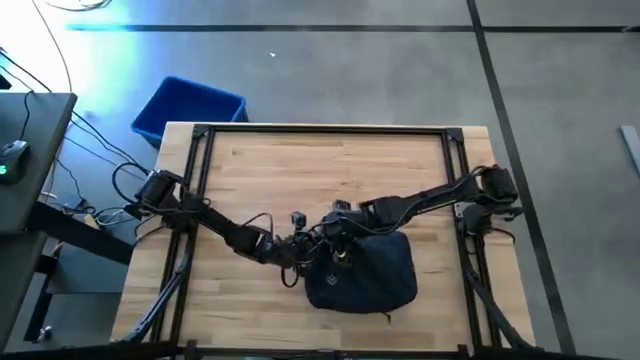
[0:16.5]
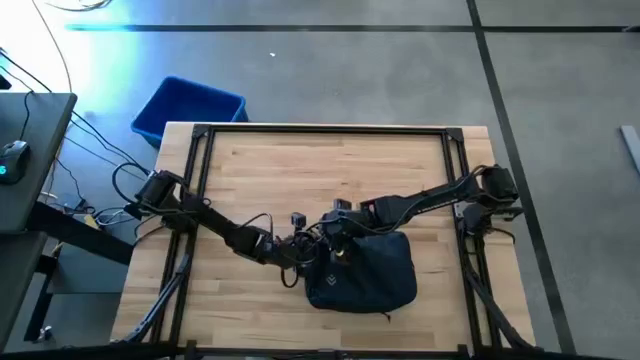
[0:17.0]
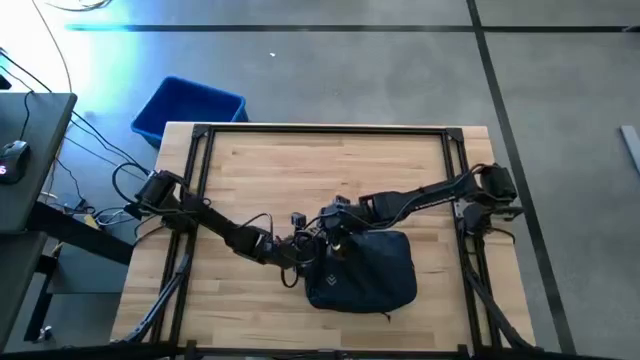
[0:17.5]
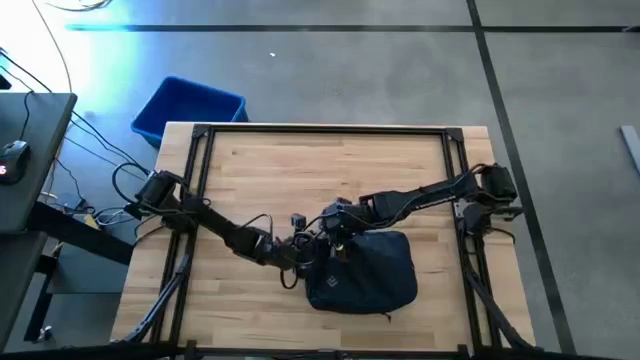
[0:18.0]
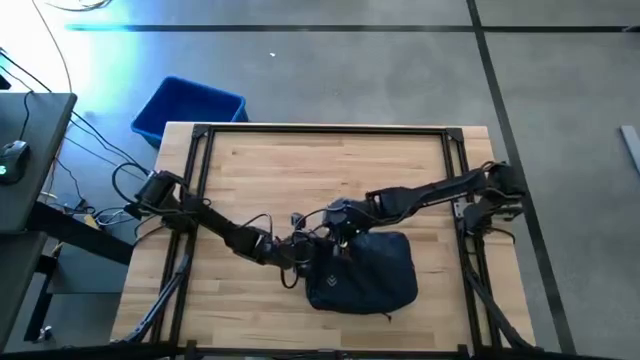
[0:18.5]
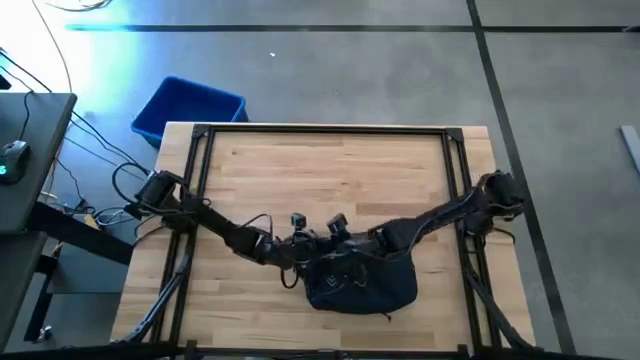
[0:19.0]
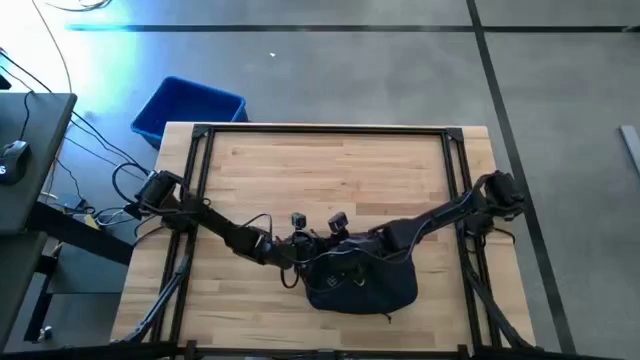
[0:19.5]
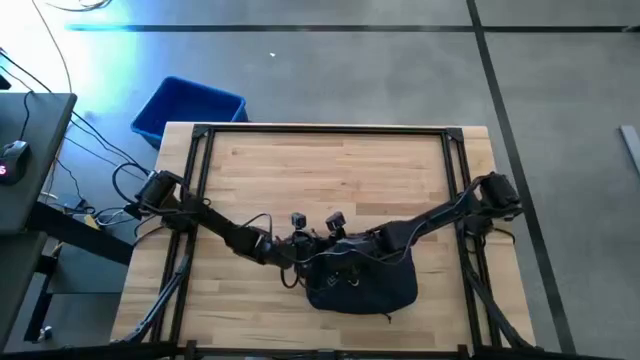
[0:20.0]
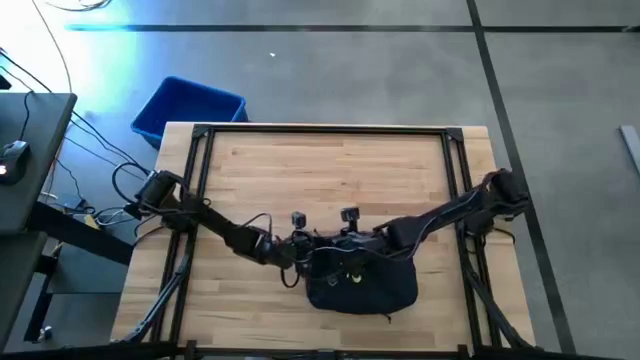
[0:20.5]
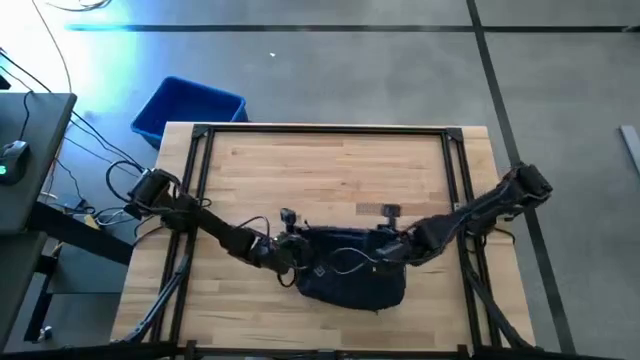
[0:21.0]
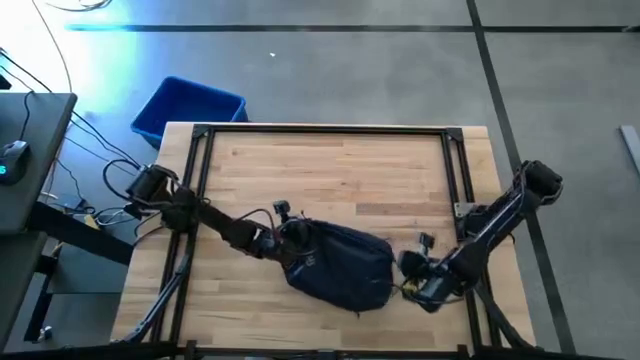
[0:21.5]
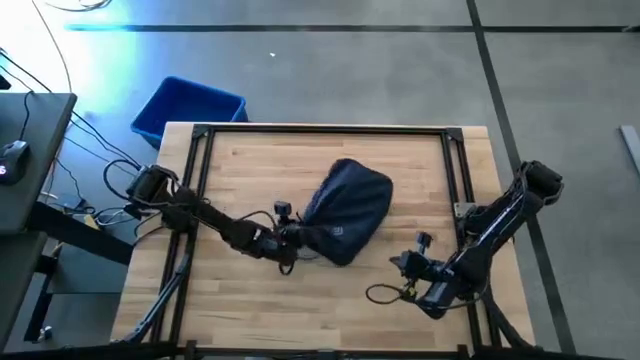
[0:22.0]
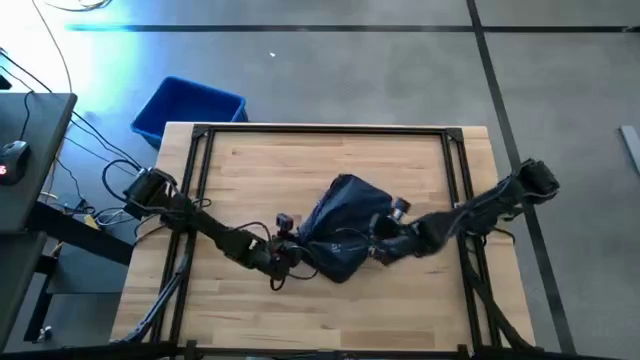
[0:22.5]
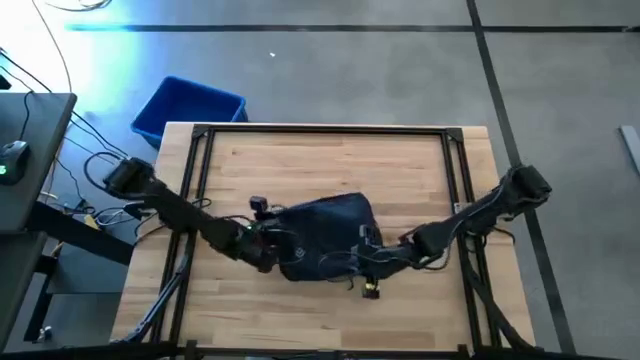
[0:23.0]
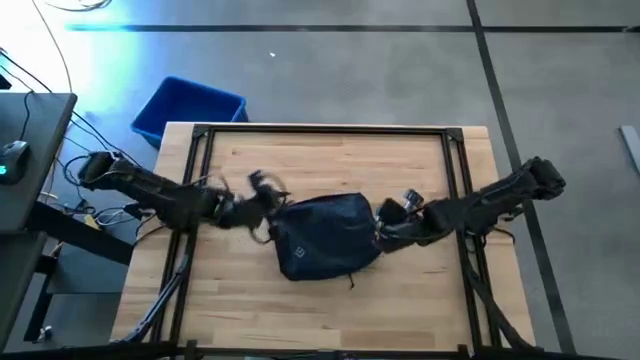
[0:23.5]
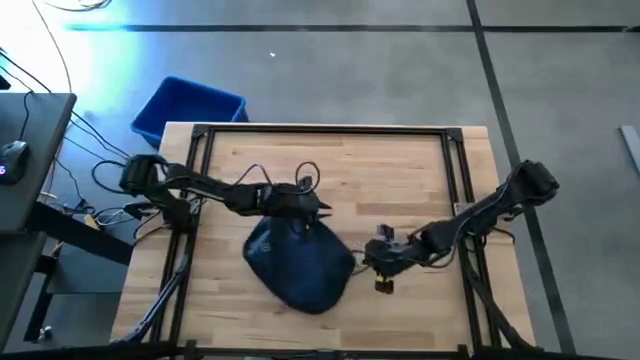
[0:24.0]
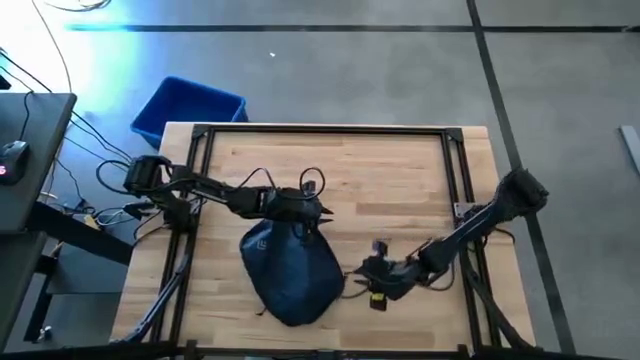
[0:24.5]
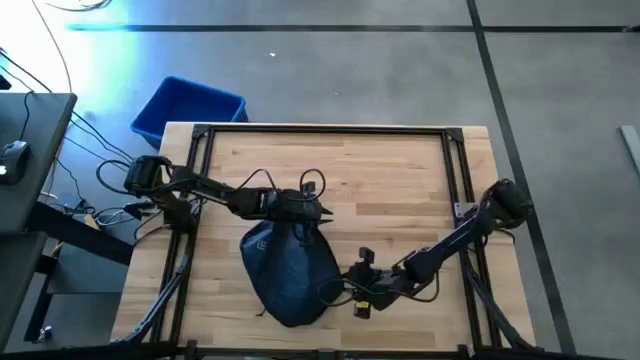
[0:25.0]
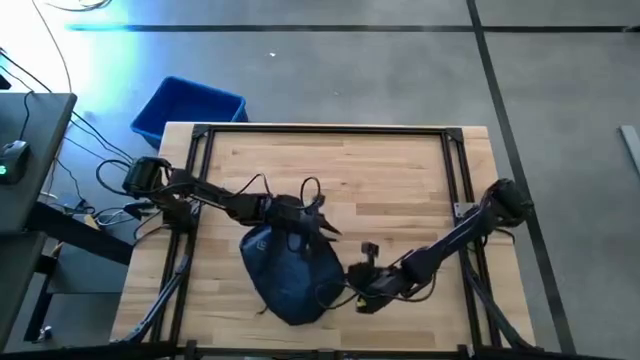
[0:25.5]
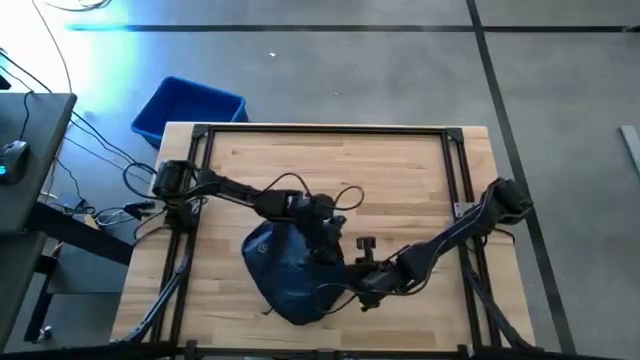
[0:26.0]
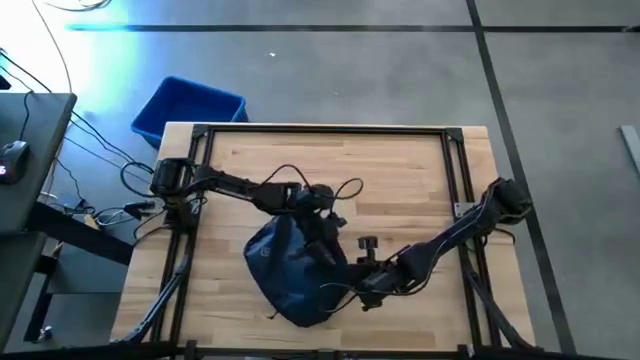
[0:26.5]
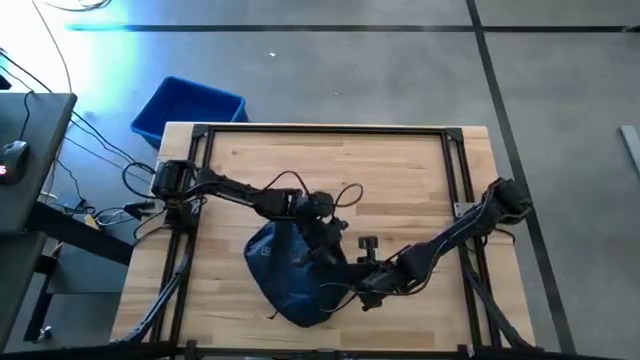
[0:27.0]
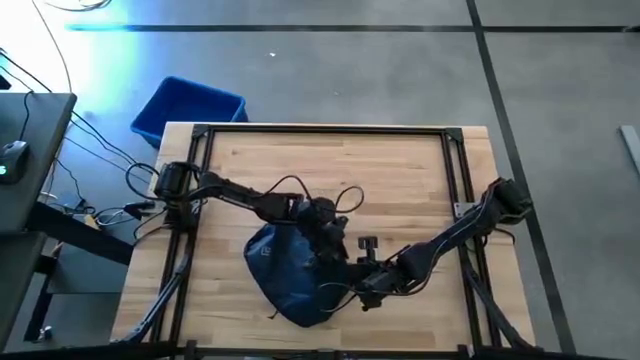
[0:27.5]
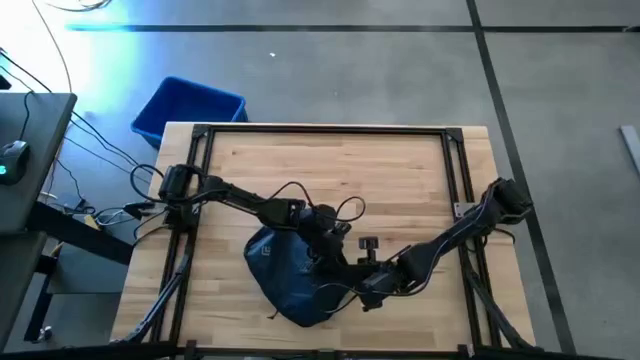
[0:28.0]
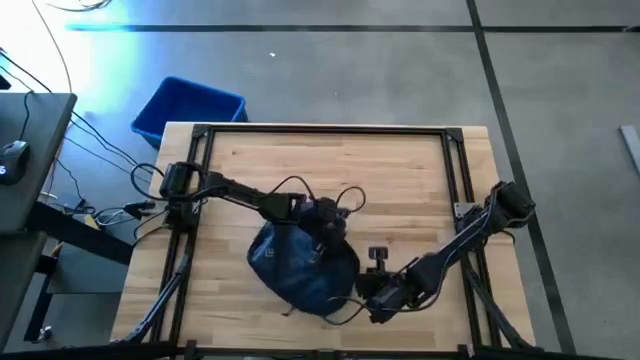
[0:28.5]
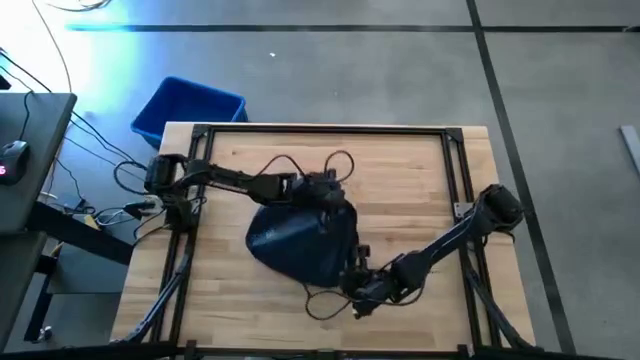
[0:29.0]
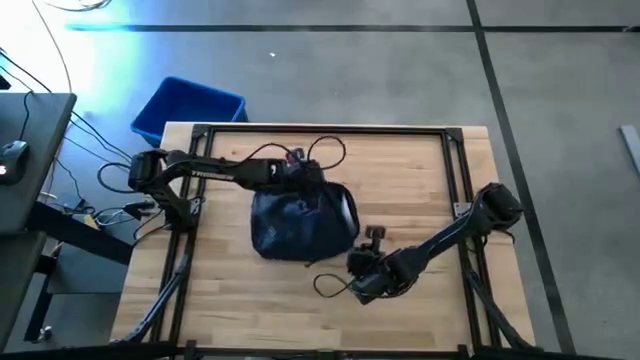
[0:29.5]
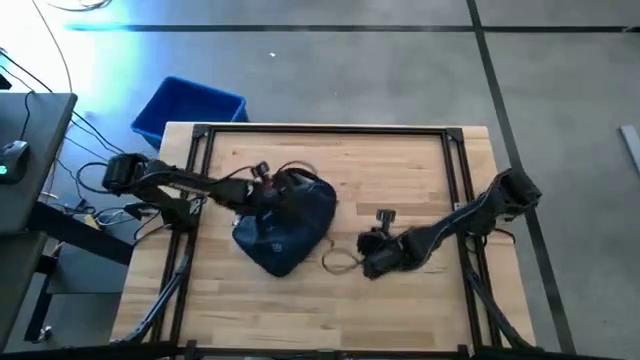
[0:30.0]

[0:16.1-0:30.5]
Task: Unpack backpack
Open the backpack

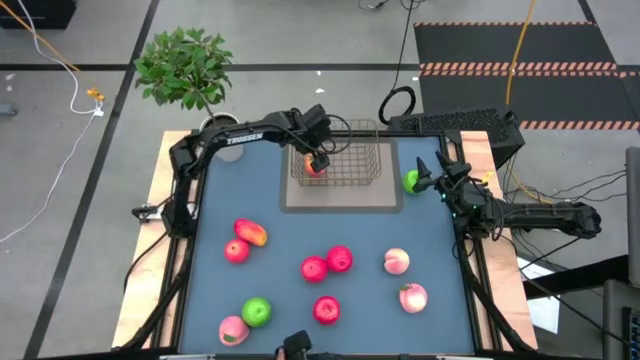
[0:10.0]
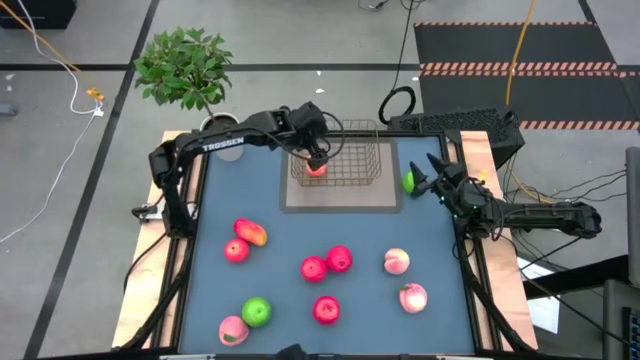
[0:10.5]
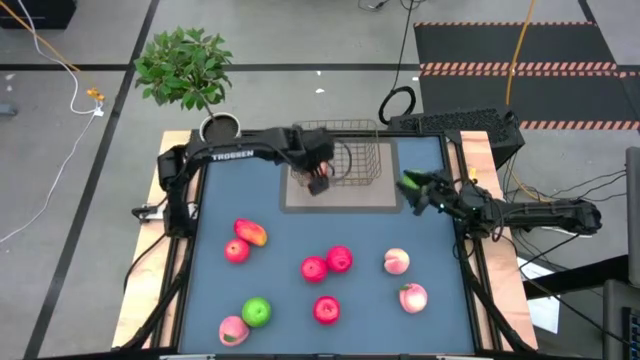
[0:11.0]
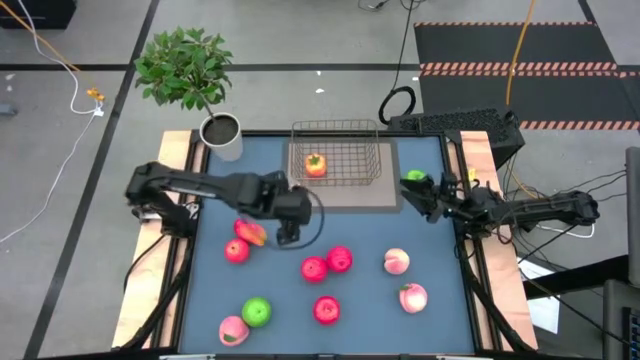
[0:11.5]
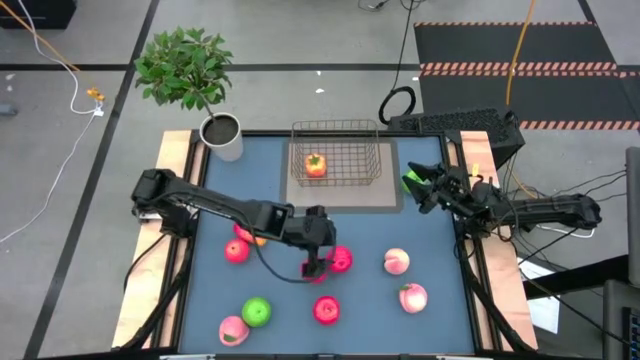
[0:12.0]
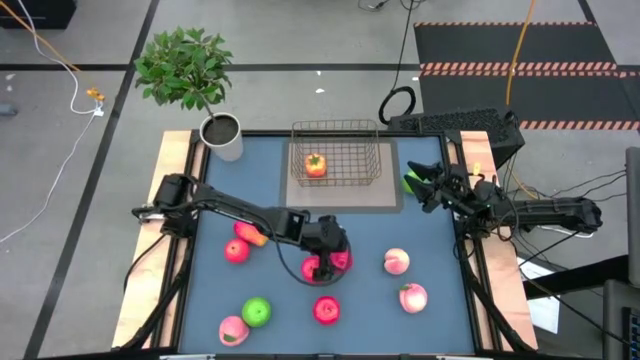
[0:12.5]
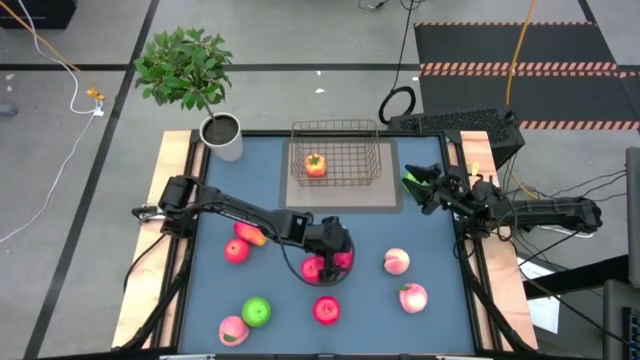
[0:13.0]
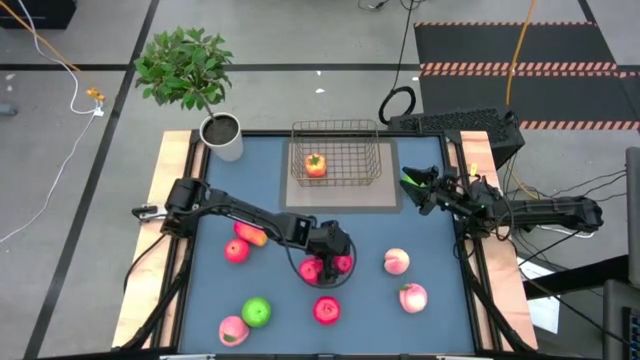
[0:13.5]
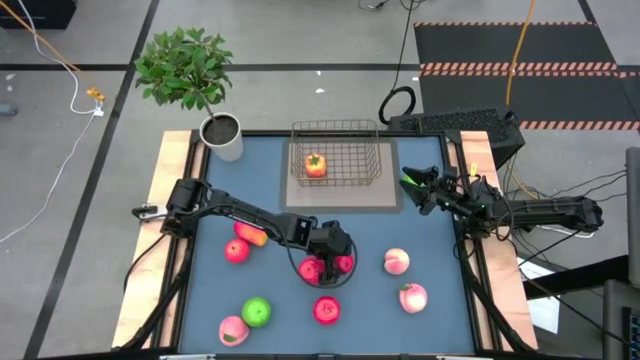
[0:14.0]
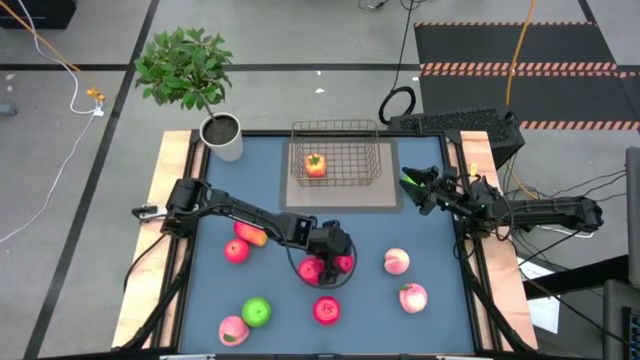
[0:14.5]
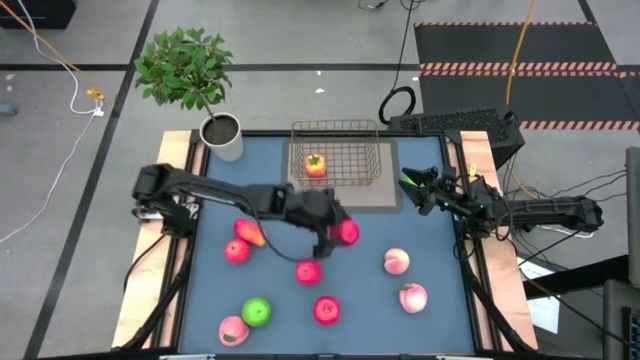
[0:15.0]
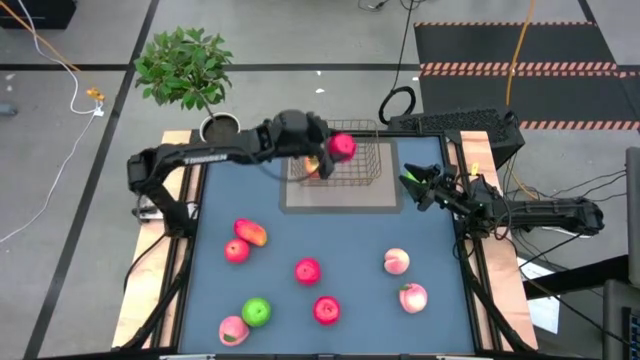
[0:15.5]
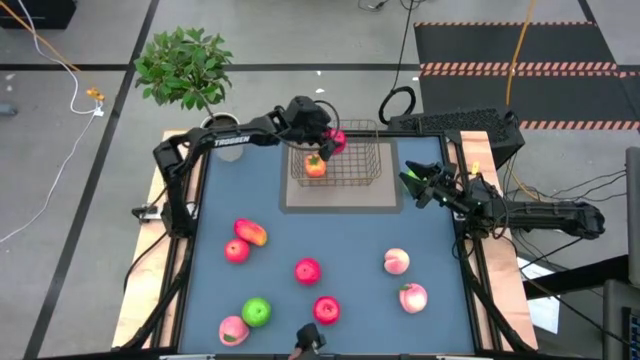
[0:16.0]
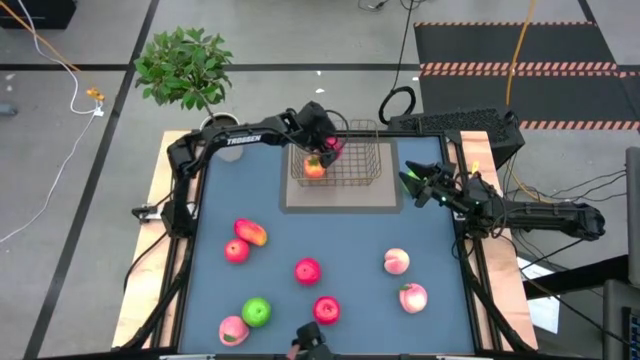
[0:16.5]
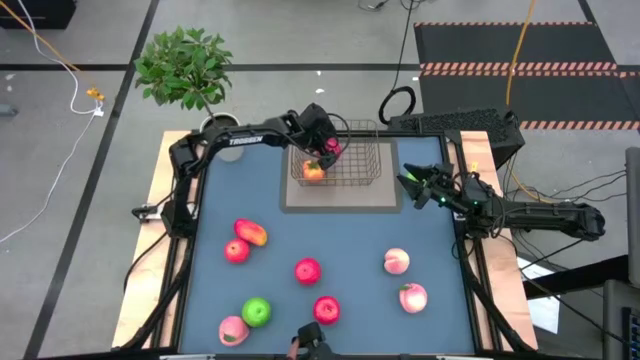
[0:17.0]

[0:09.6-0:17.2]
Task: Build produce basket
Put the red apple into the wire basket
